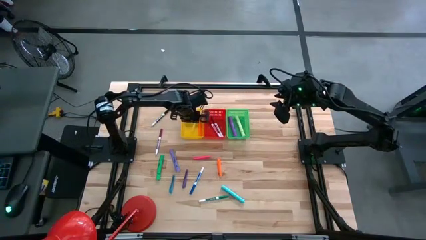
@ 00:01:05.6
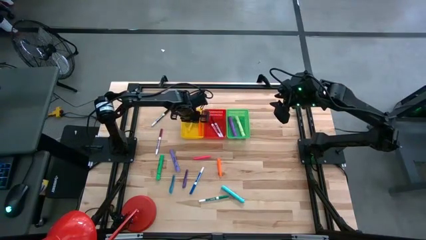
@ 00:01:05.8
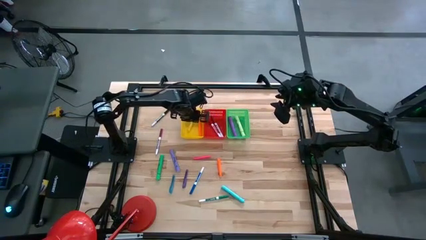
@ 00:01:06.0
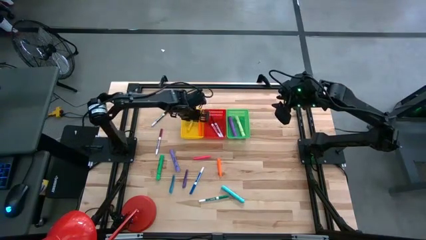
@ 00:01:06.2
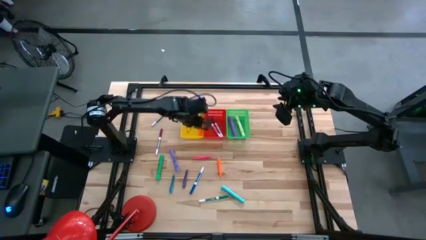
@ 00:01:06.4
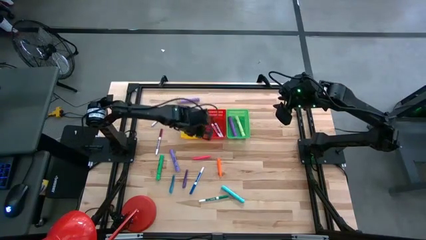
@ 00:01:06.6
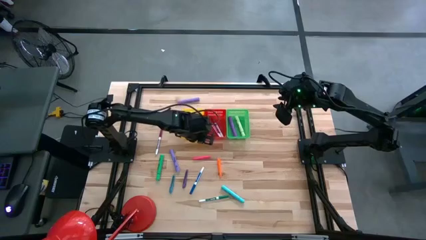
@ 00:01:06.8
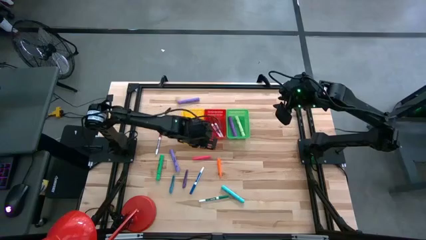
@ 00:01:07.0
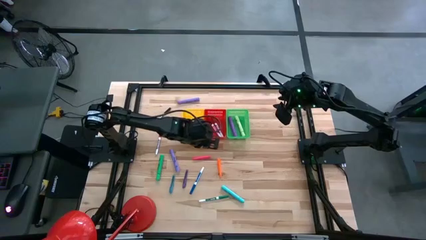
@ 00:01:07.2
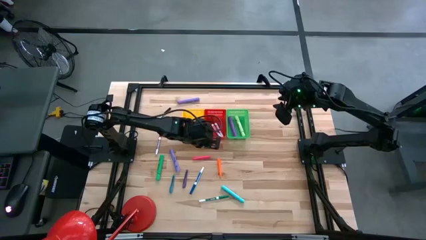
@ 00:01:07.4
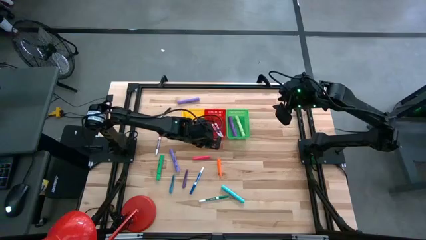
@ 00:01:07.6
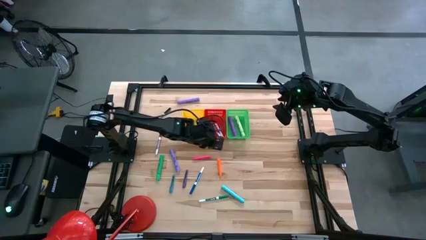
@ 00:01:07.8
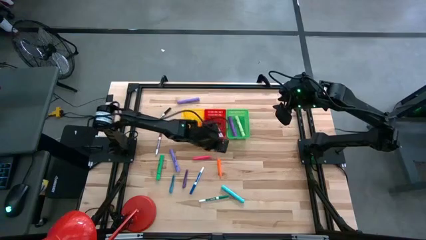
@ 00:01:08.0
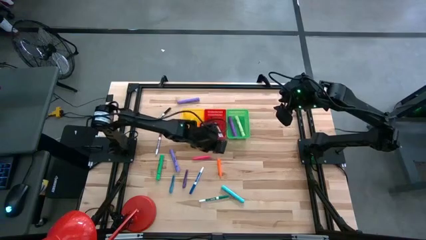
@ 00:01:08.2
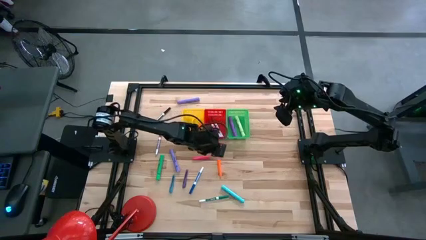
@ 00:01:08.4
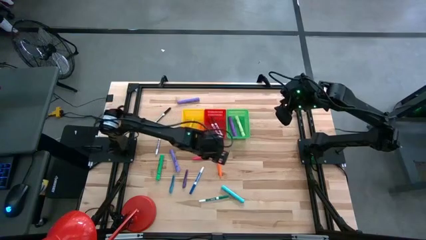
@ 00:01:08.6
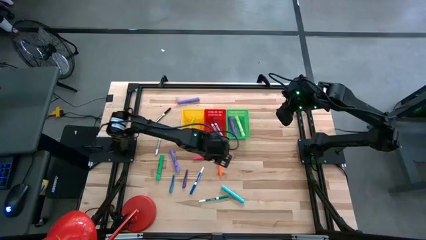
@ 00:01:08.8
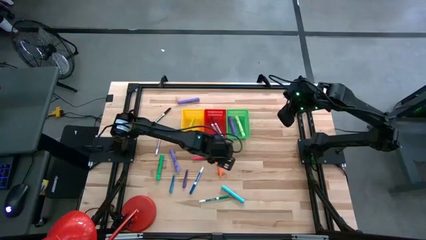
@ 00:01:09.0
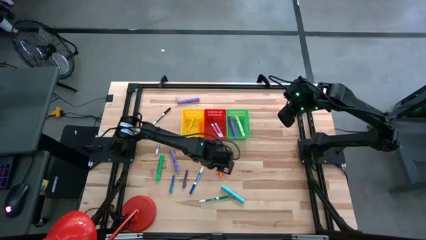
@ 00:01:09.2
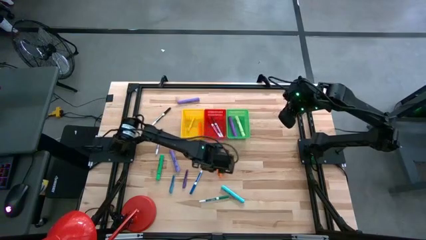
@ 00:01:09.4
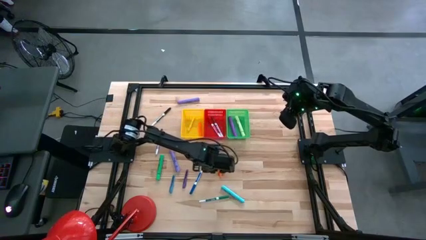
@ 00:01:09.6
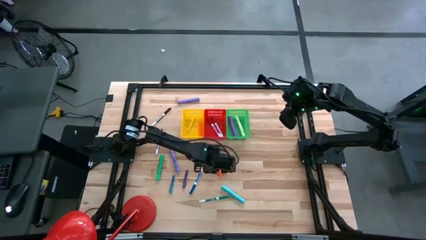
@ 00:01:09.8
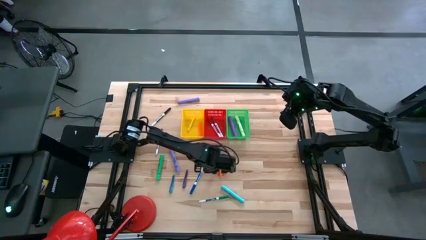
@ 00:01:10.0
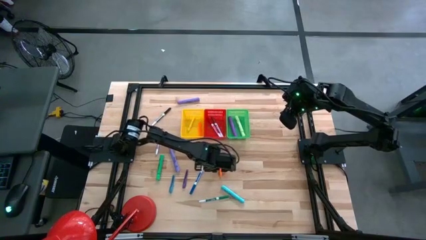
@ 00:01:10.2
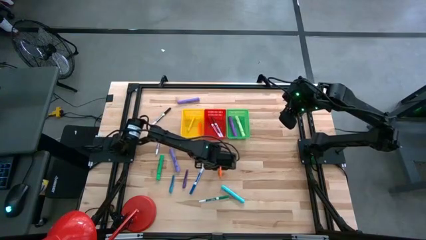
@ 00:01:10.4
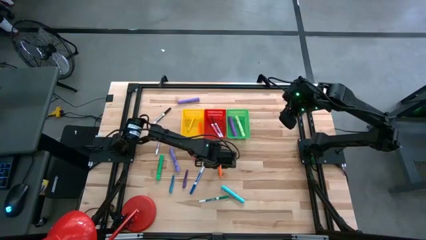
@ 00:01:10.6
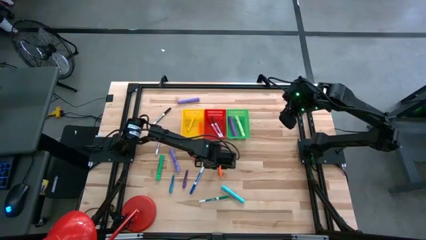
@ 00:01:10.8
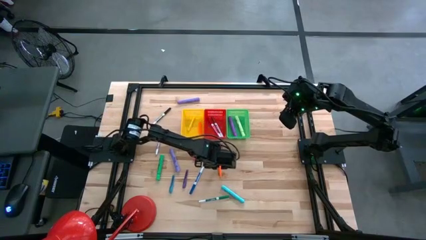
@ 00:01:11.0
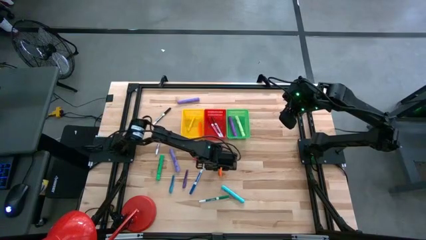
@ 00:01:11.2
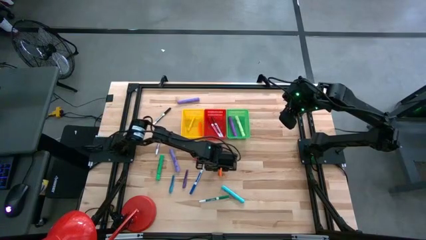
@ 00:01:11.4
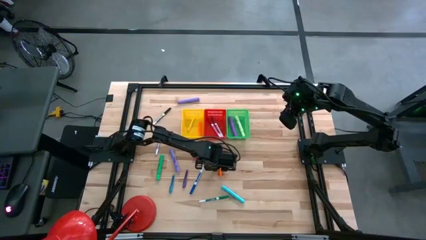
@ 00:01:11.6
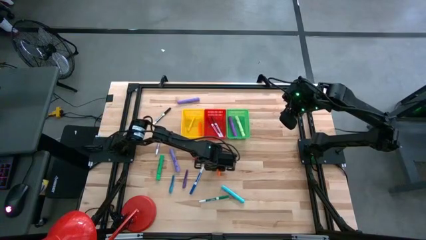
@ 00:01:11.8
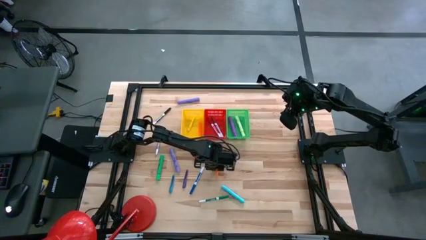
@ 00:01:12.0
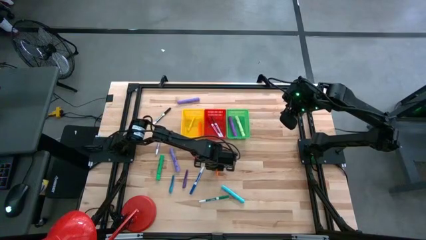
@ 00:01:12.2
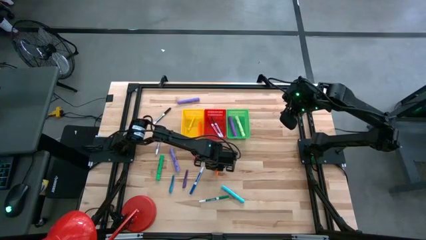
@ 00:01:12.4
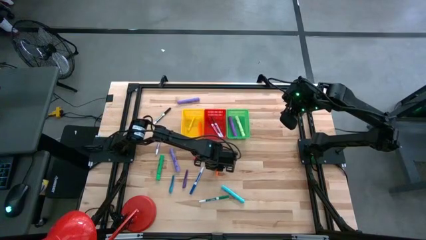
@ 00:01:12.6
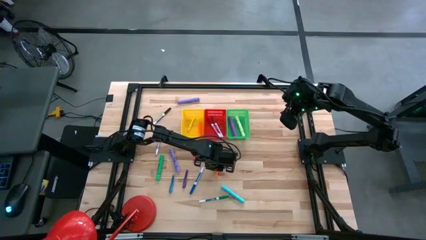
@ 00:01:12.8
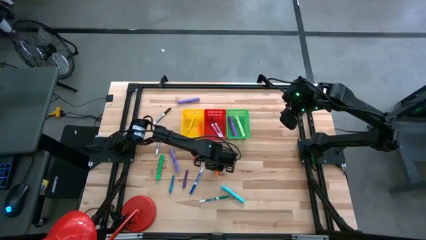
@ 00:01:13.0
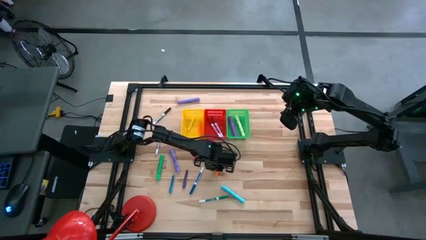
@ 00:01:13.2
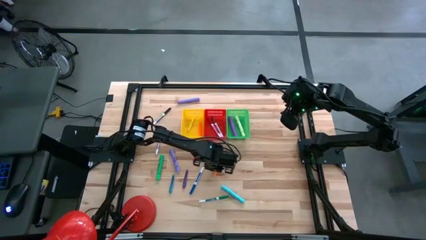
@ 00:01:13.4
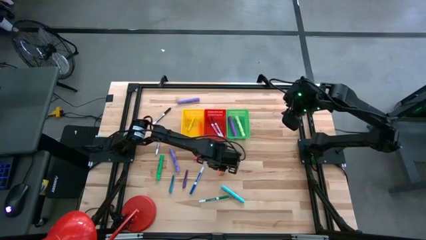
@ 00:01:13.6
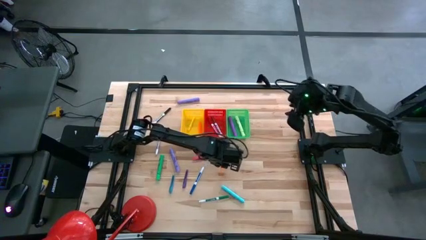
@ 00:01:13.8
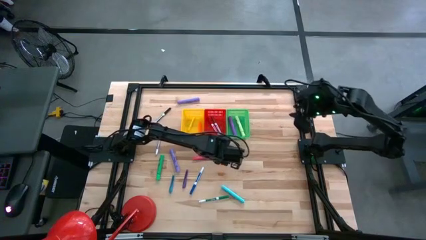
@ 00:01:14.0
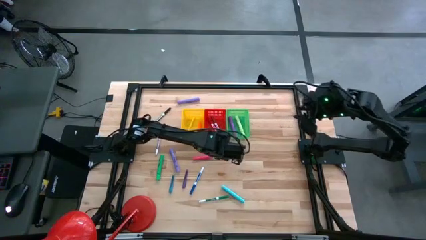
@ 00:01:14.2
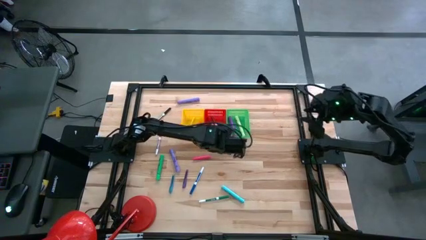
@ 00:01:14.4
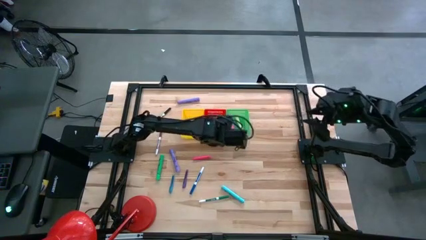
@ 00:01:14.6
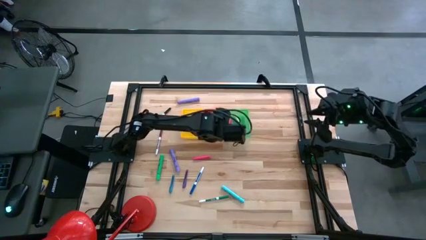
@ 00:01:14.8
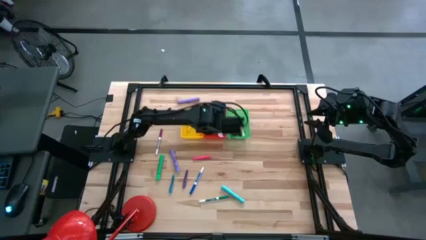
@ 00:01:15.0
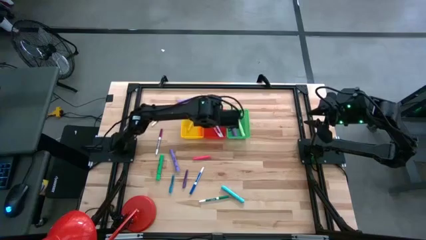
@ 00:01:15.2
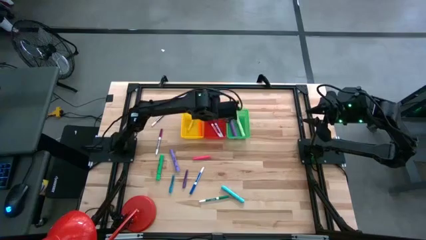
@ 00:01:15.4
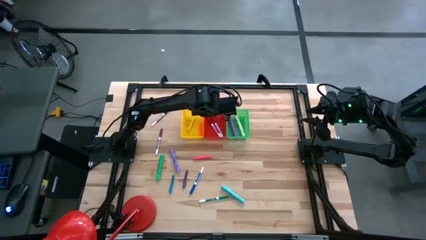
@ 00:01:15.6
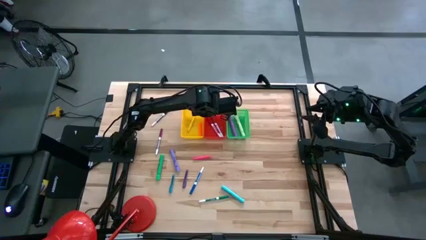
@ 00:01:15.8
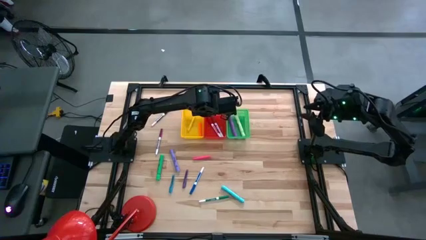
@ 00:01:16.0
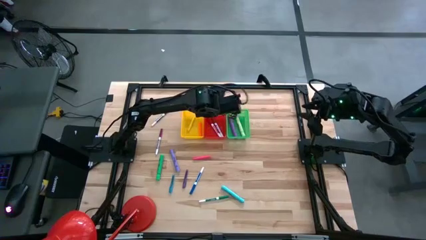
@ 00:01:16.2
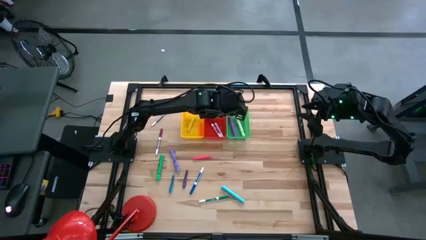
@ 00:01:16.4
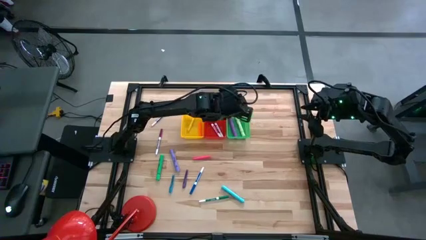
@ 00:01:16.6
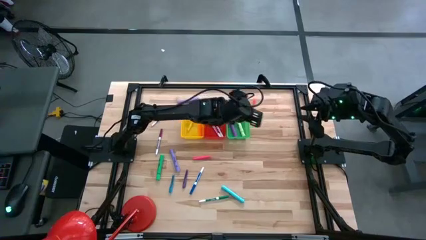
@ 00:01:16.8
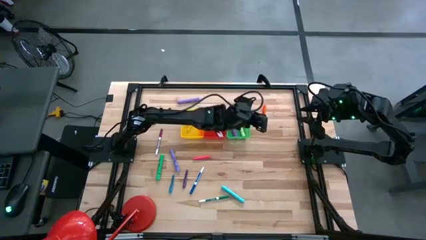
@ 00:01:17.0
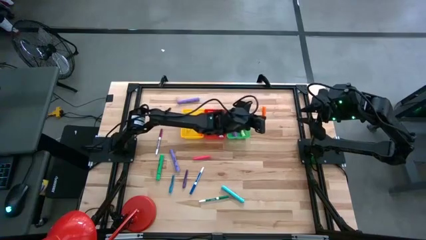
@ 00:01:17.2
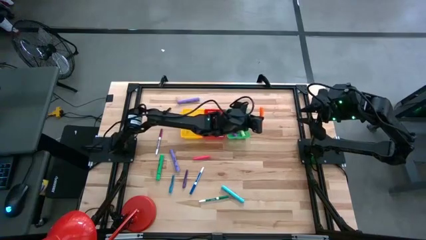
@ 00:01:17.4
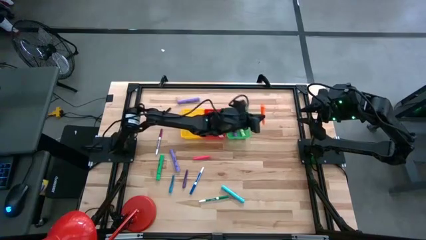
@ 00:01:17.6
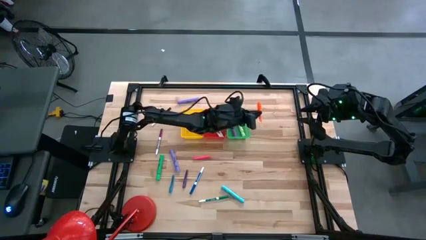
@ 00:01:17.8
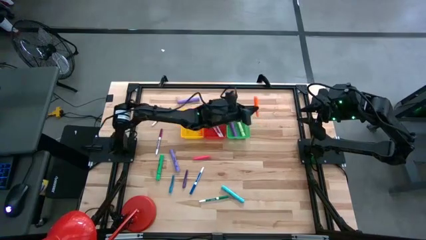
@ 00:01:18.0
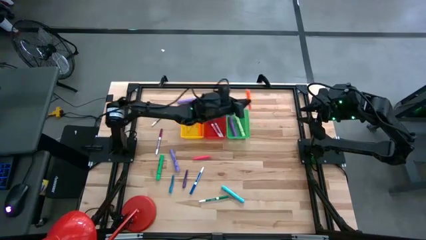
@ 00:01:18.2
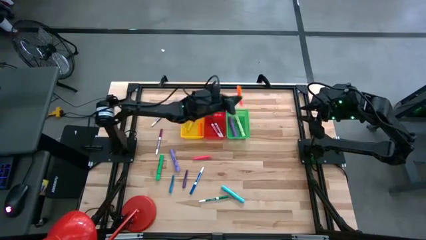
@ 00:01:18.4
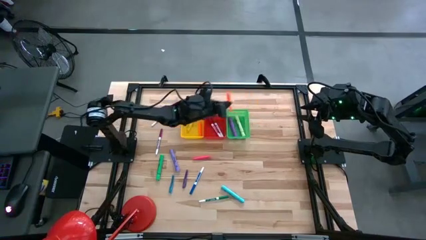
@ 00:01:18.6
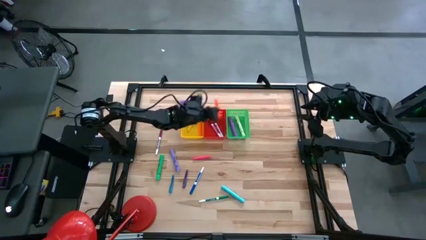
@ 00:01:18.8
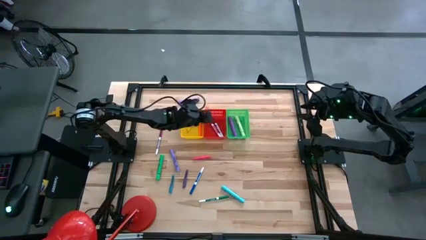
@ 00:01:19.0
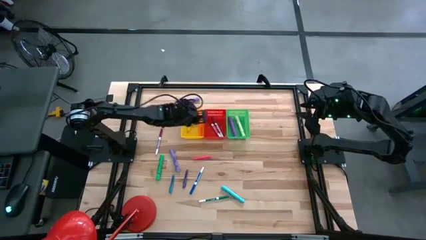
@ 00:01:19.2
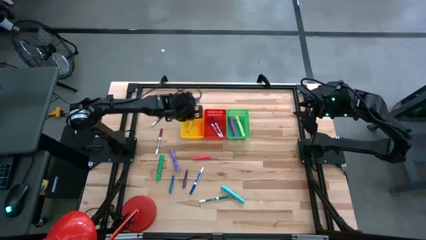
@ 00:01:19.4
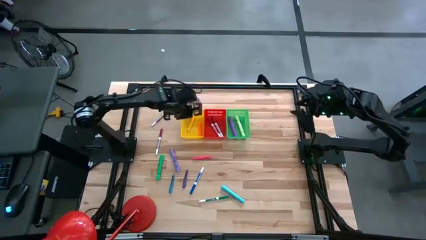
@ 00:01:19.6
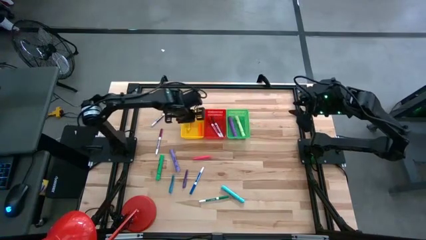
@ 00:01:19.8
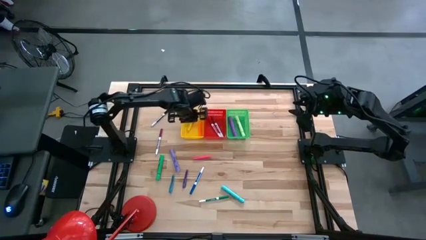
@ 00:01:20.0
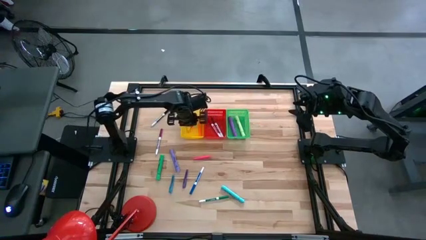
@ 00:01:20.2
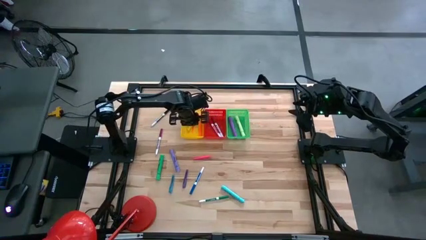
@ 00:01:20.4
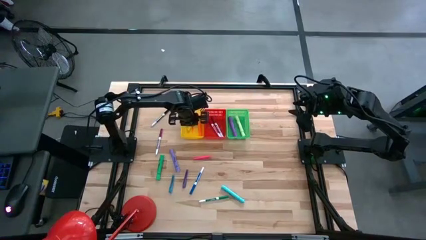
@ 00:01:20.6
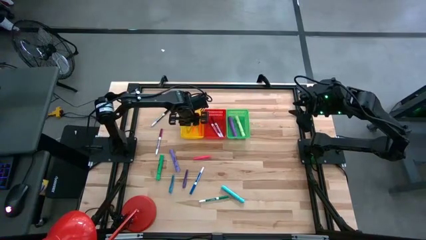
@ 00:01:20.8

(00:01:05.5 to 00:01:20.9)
Task: Pick & Place Markers
Put the orange pen into the yellow bin
